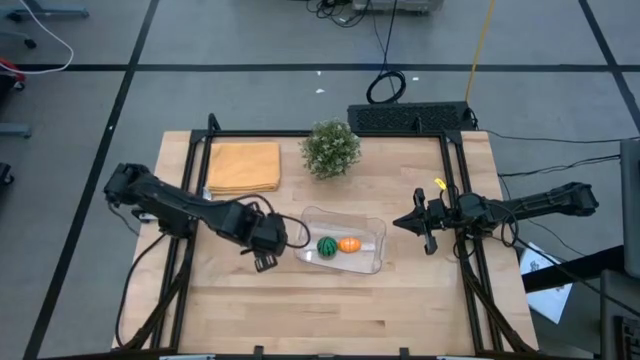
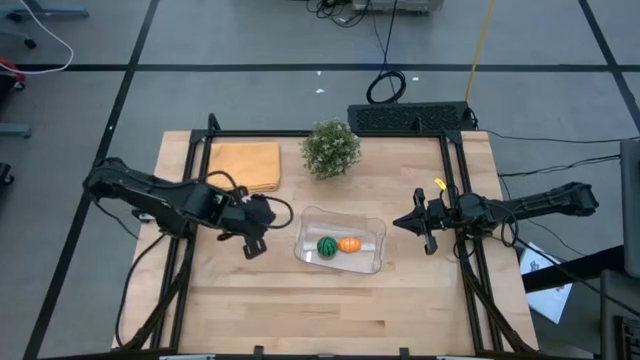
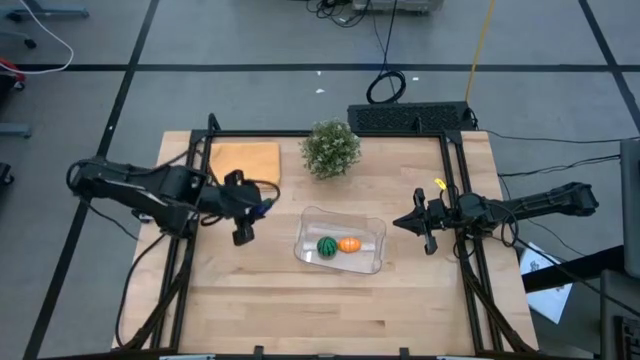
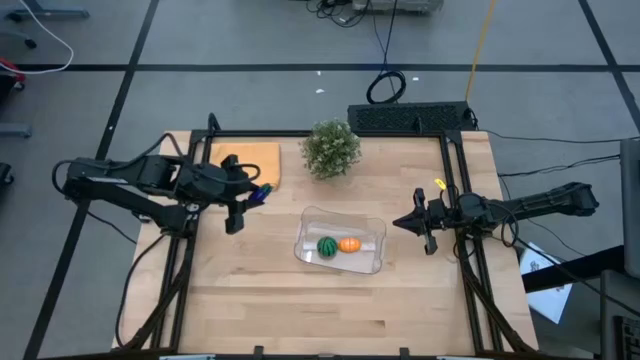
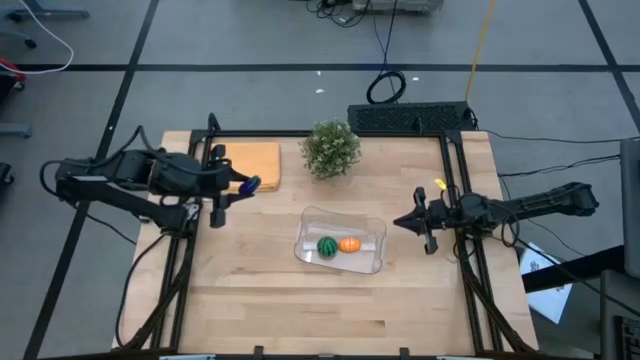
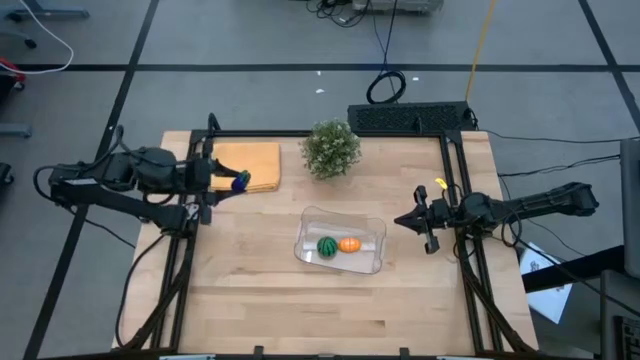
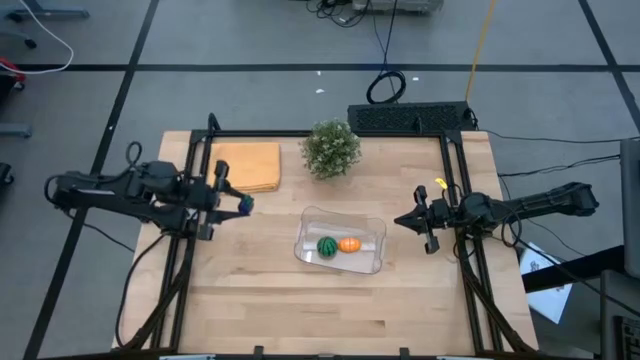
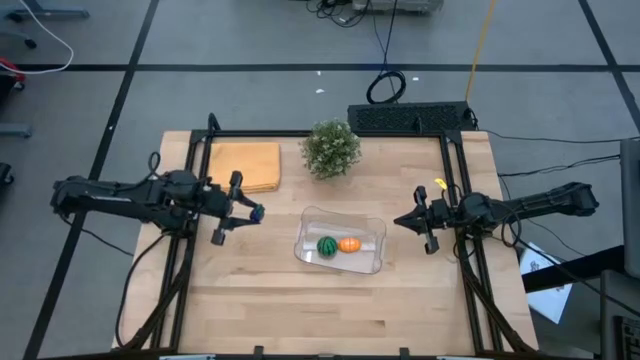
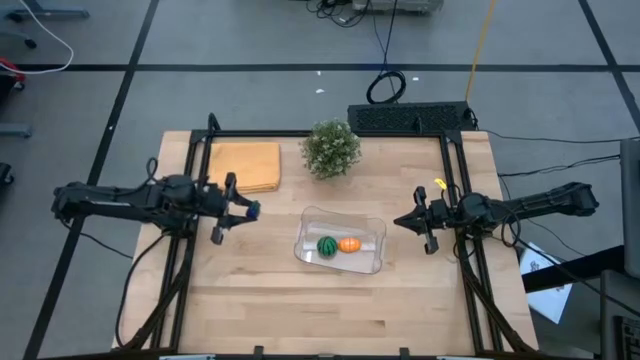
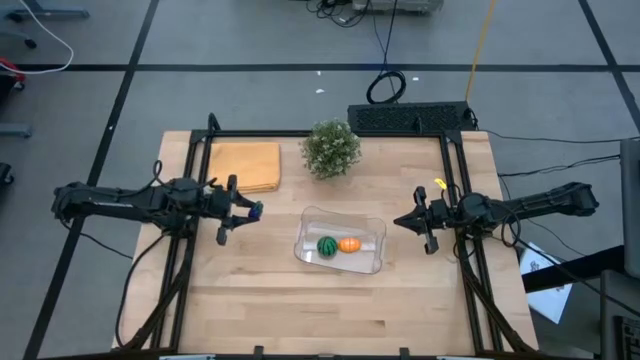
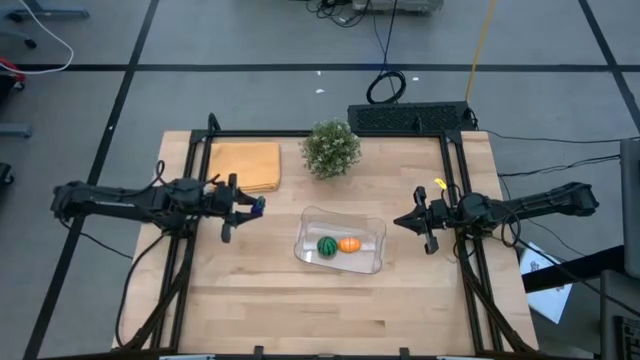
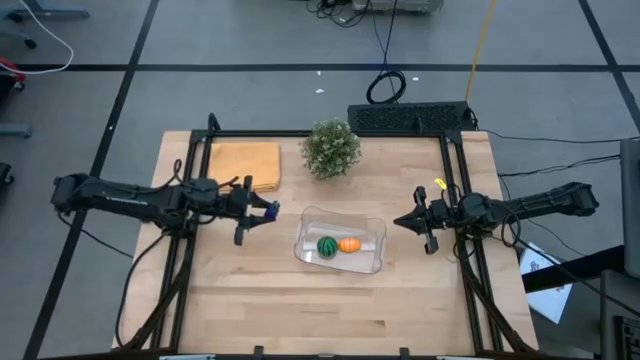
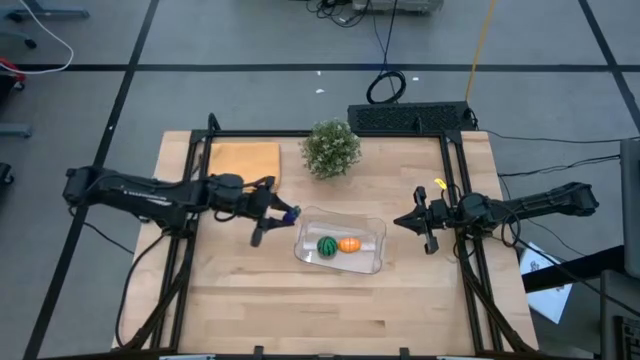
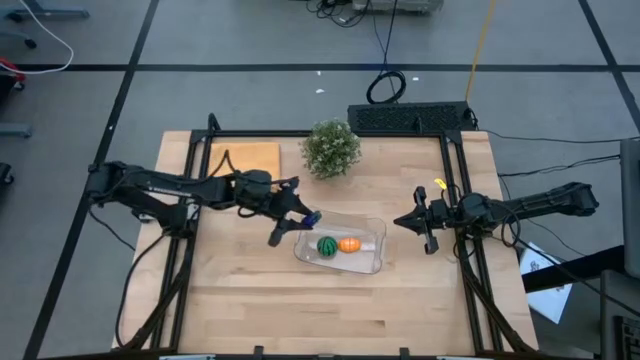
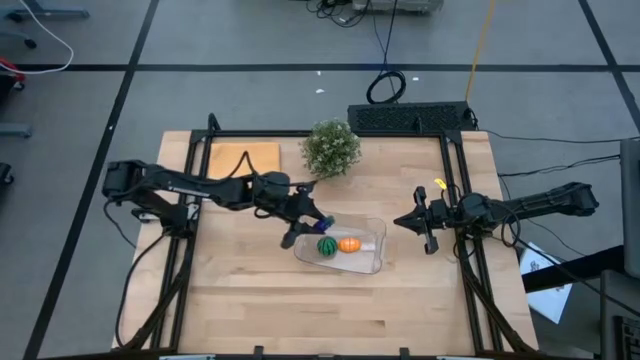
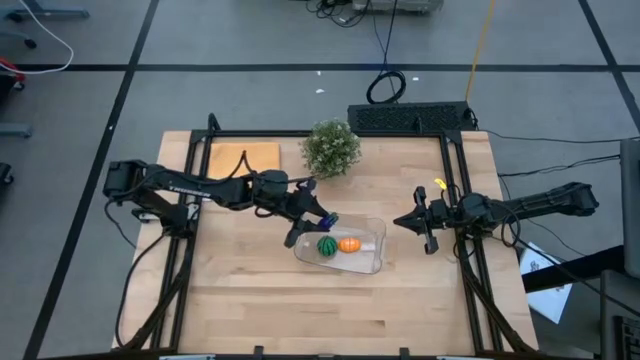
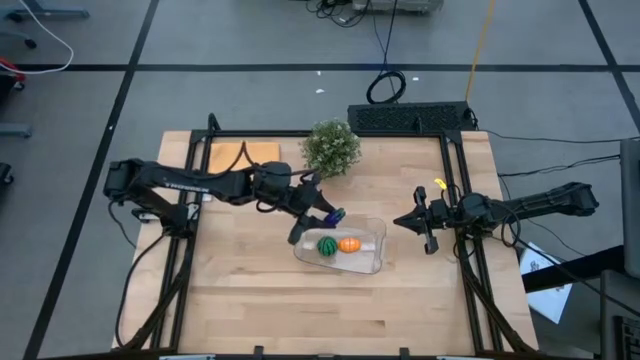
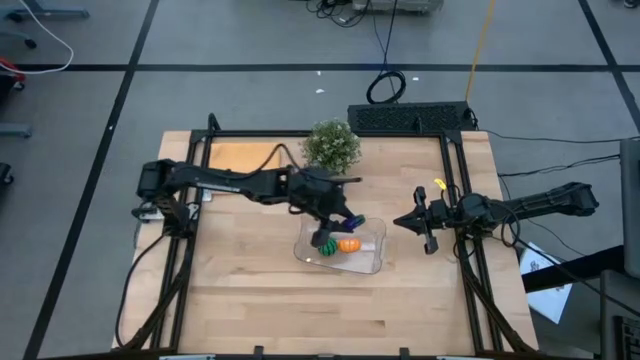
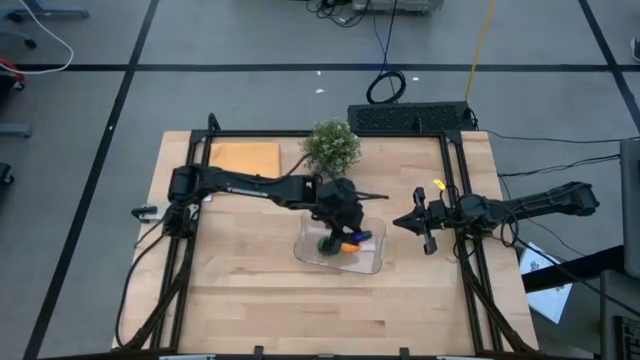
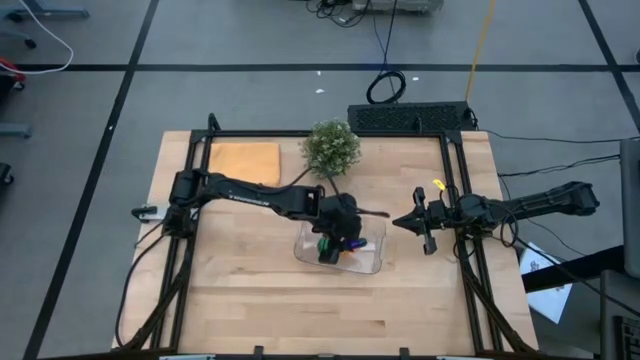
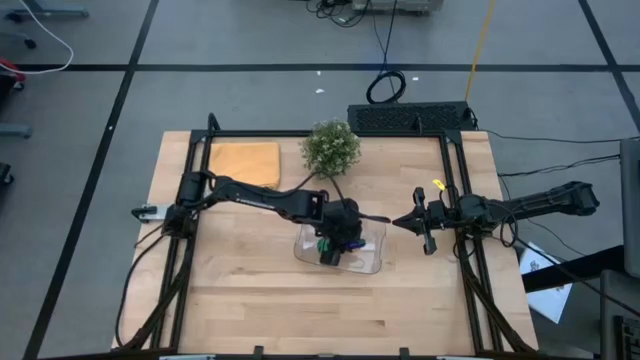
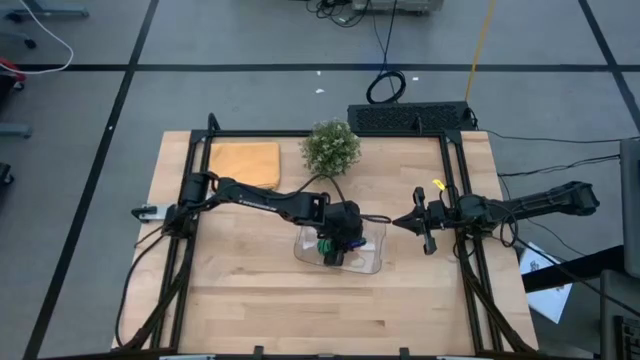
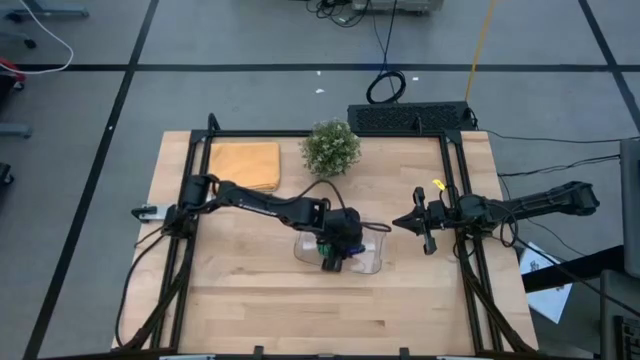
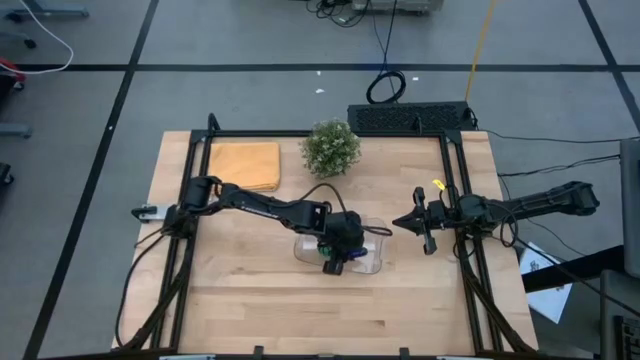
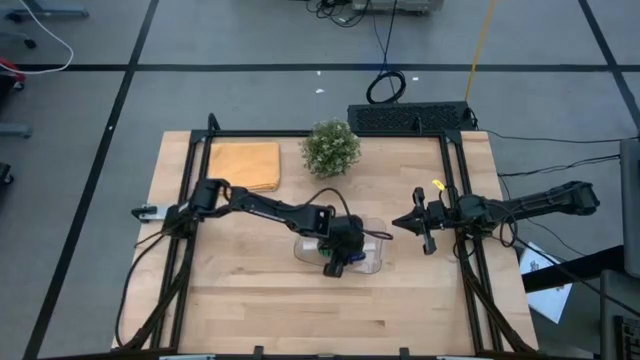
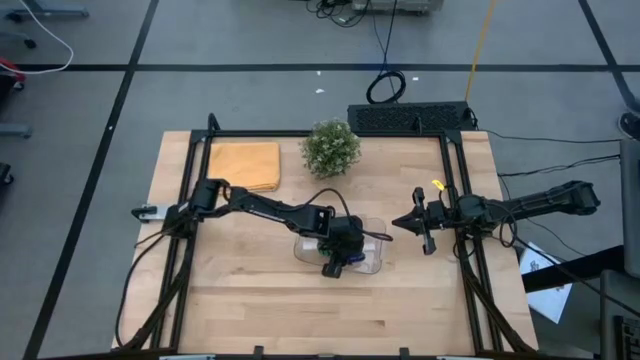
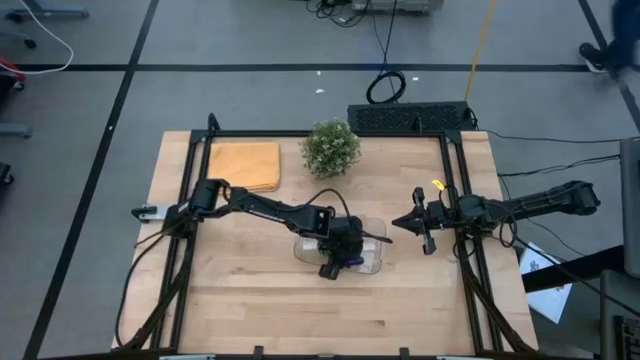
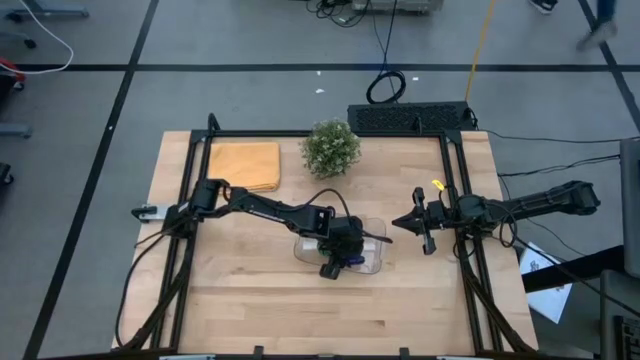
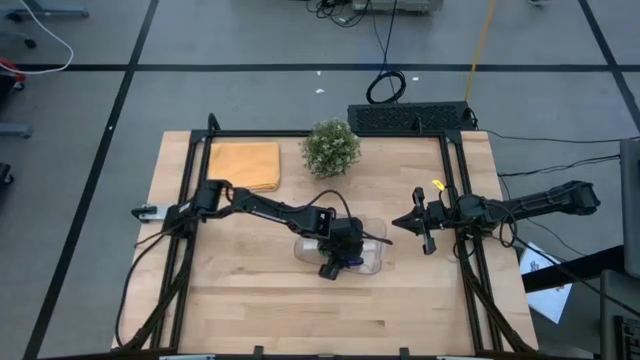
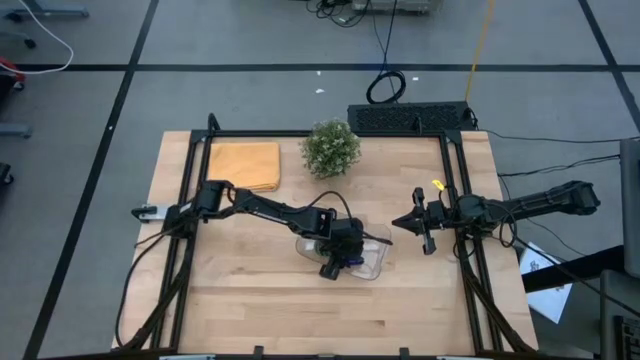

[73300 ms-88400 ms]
Task: Pick and placing Produce into tupperware
Put the eggplant into the transparent bin

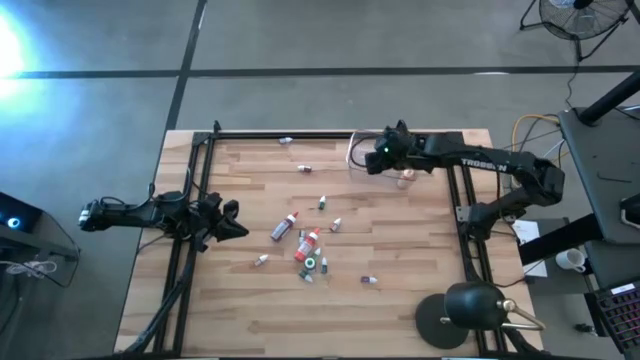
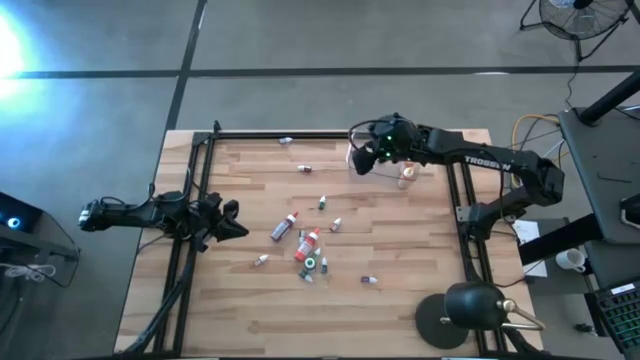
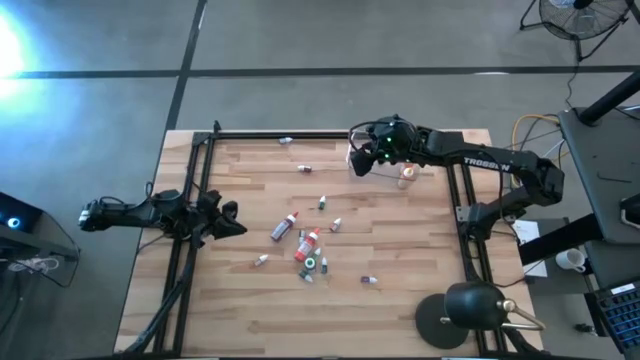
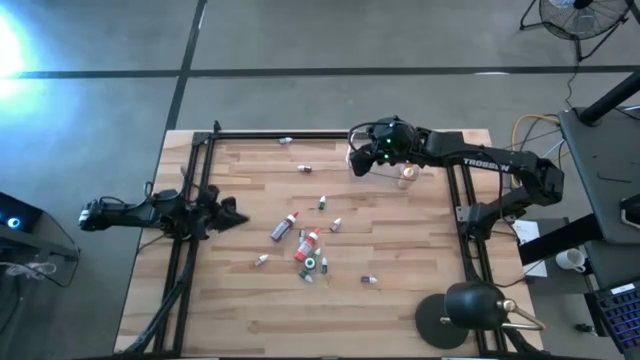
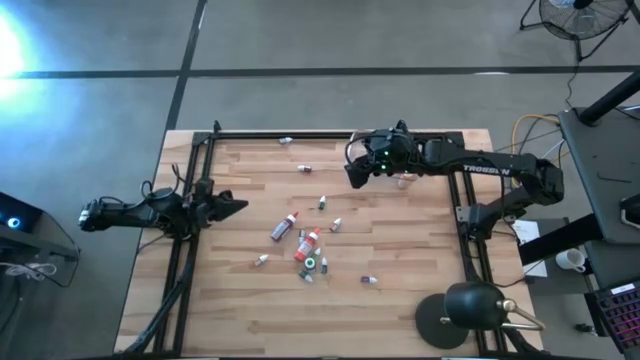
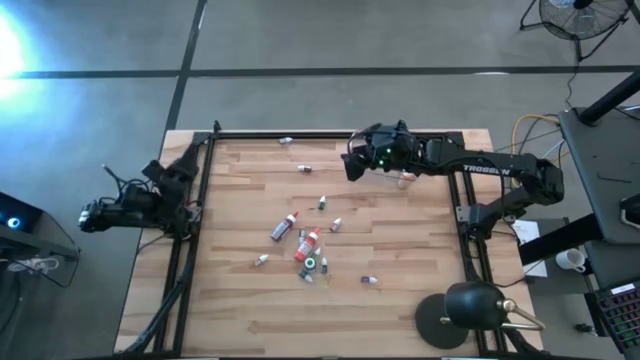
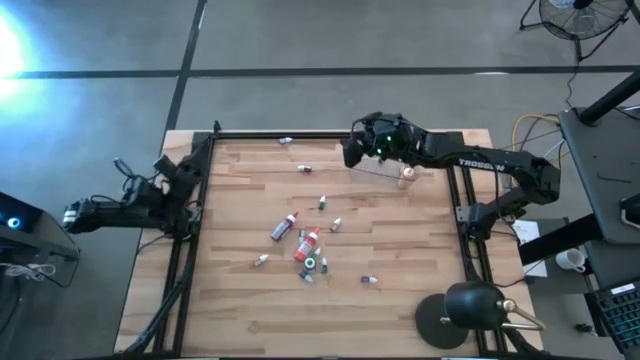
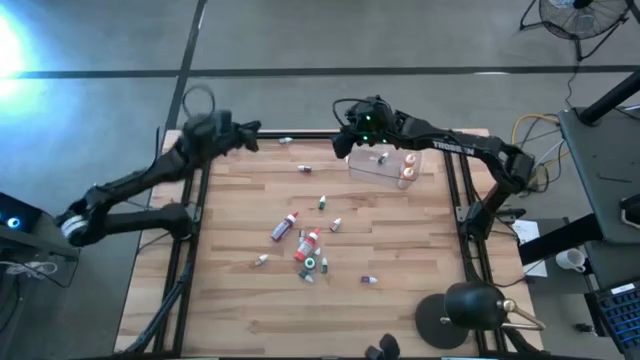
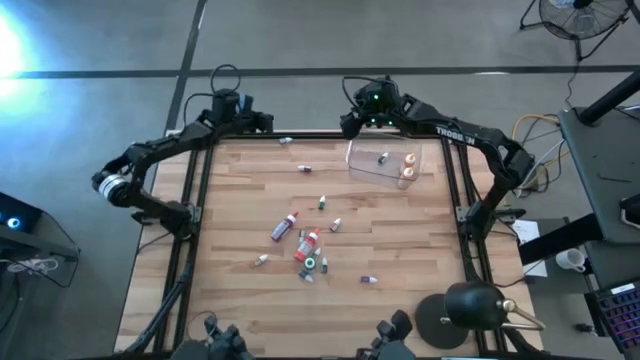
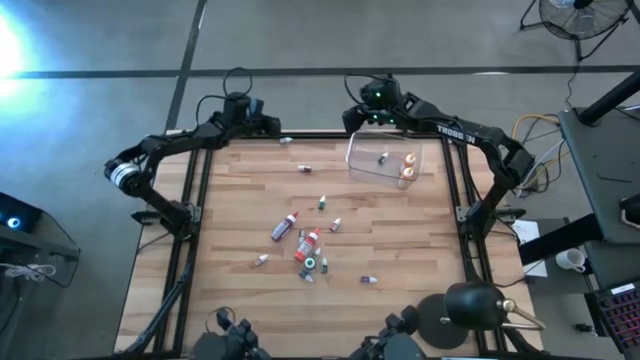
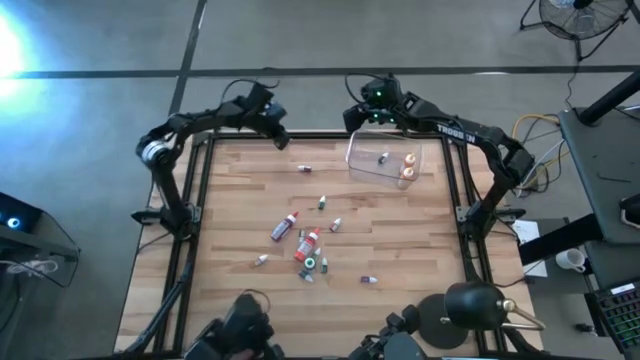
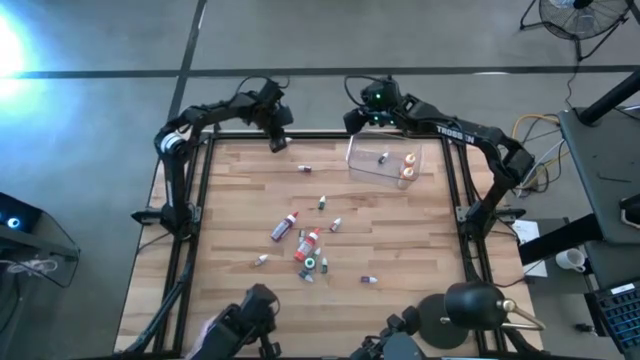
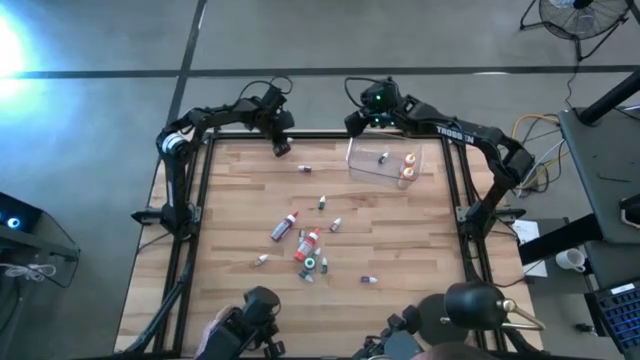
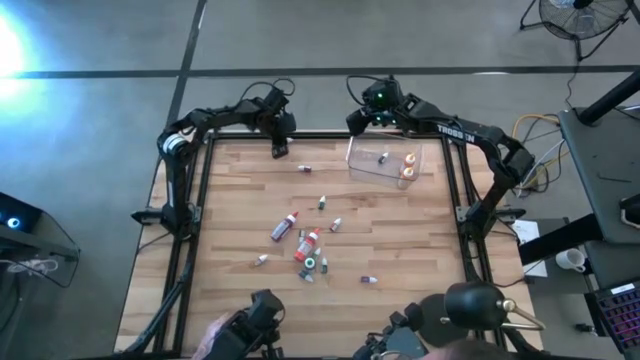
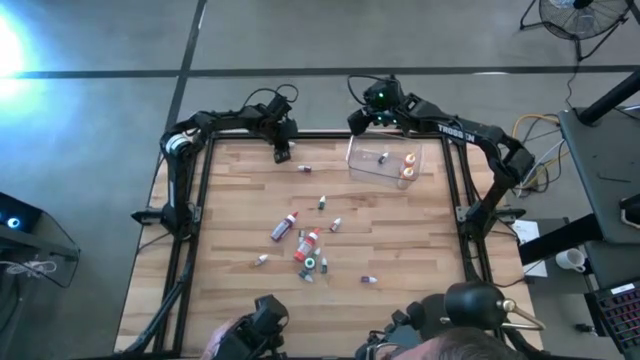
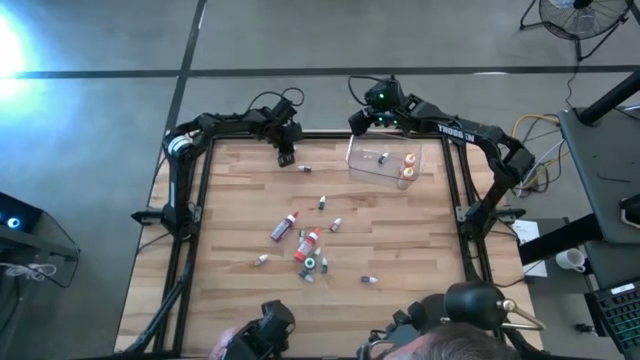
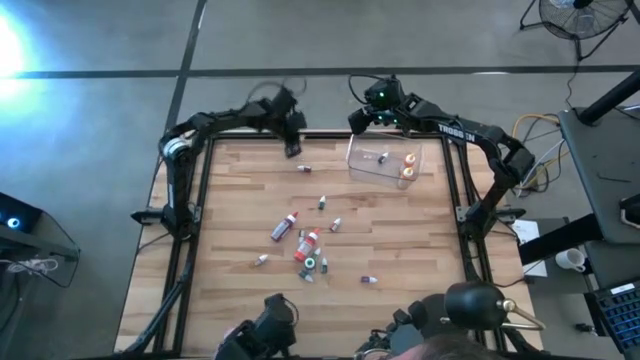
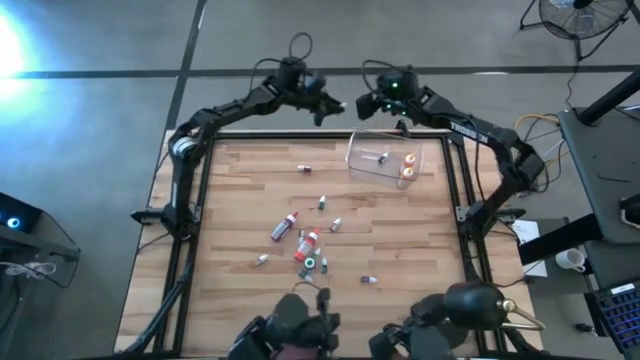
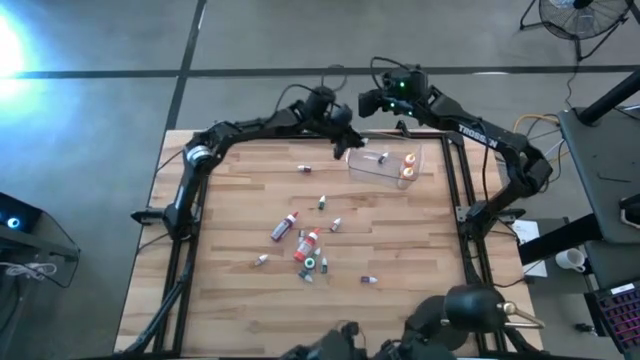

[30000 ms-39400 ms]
Task: Pick & Place food coloring
Put the small green food coloring bottle into the transparent bin
